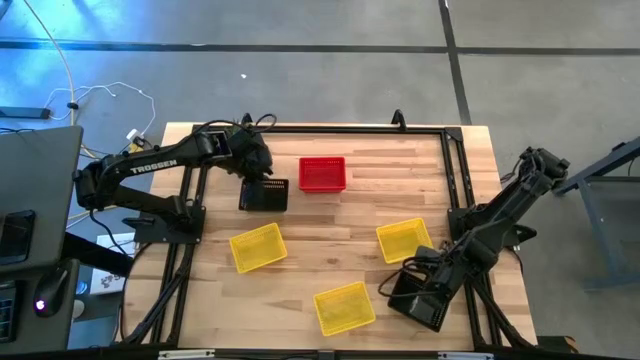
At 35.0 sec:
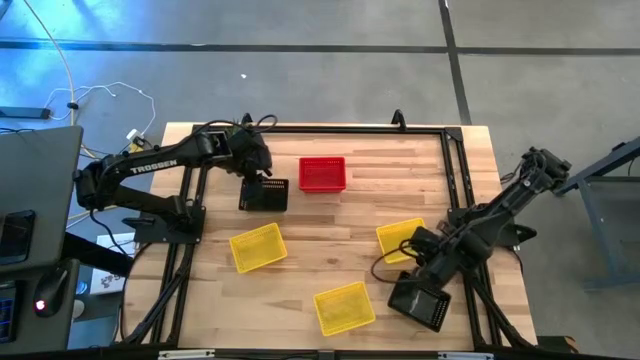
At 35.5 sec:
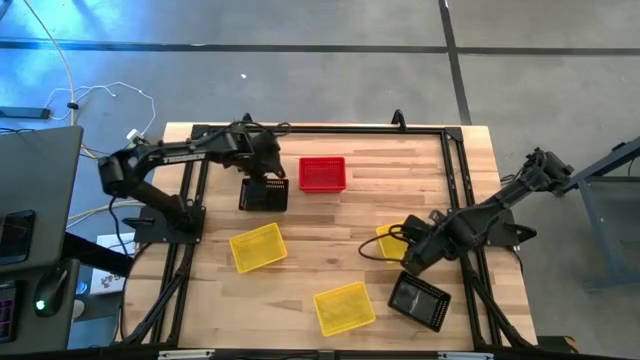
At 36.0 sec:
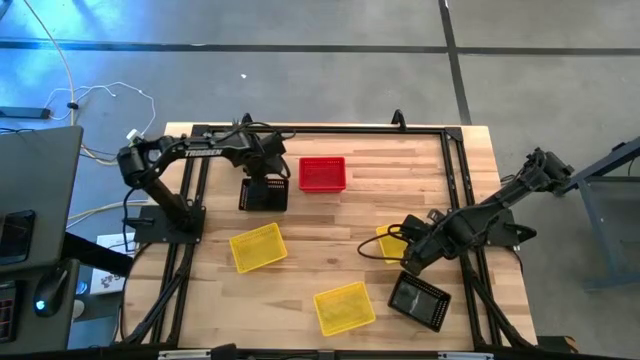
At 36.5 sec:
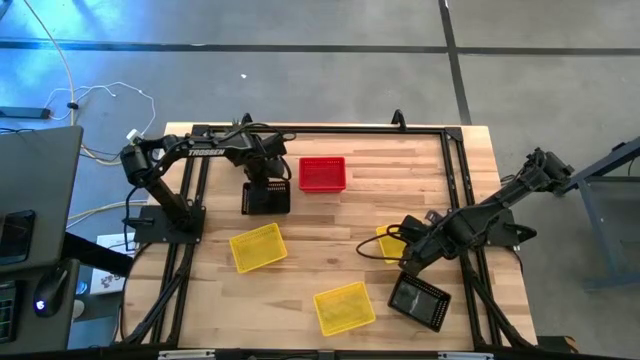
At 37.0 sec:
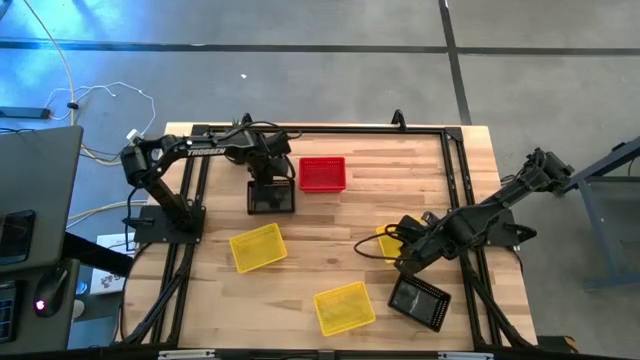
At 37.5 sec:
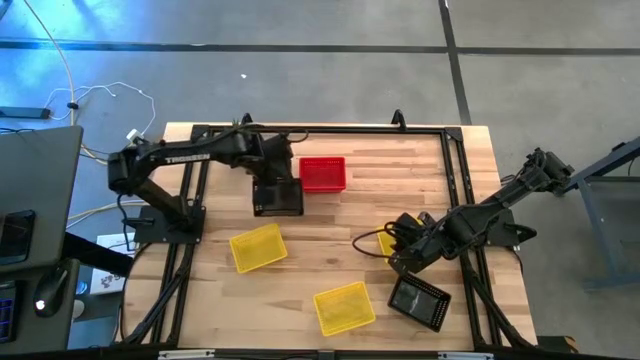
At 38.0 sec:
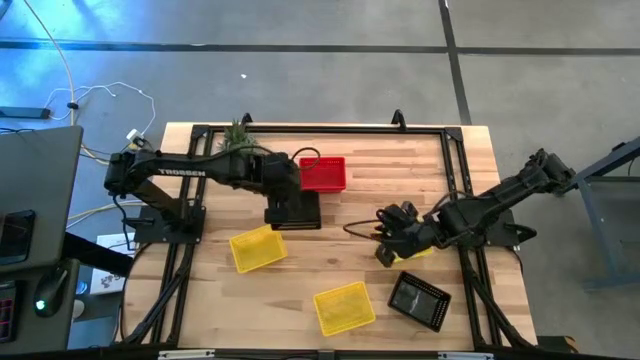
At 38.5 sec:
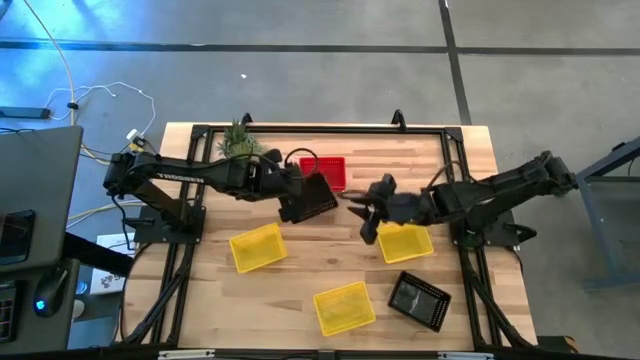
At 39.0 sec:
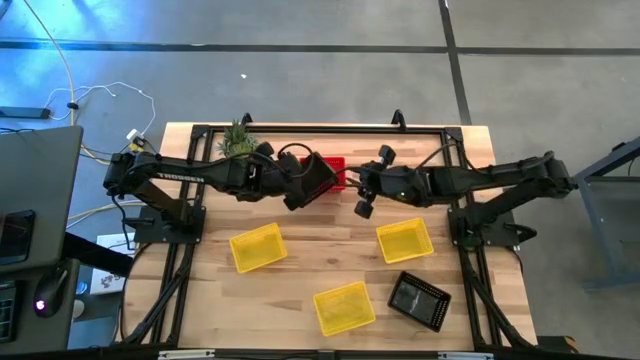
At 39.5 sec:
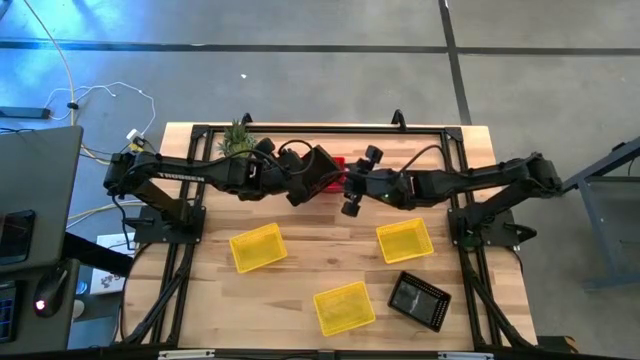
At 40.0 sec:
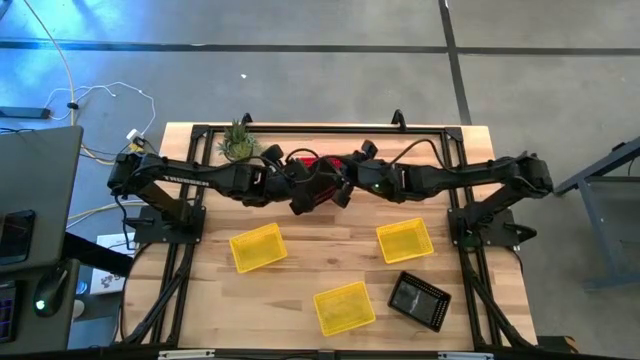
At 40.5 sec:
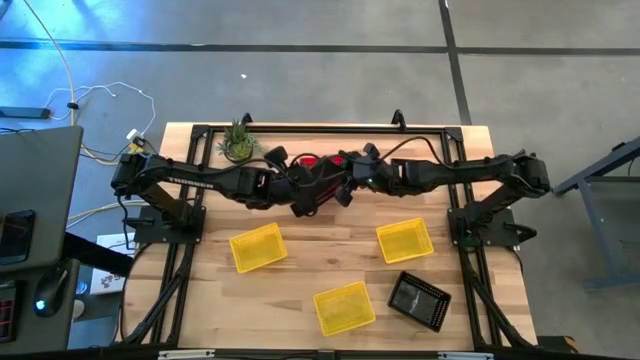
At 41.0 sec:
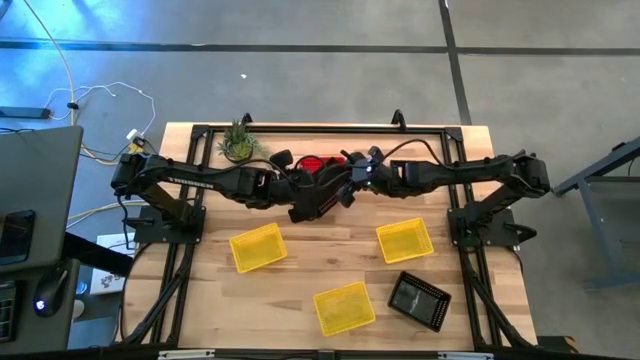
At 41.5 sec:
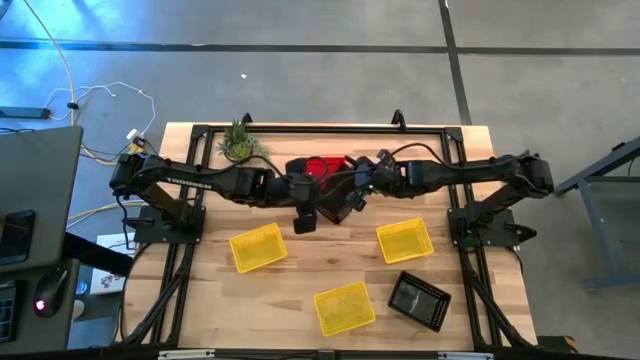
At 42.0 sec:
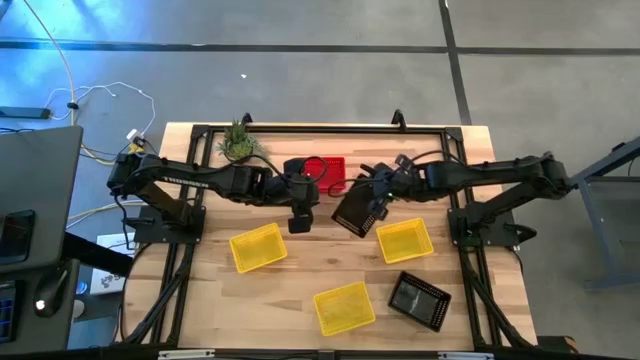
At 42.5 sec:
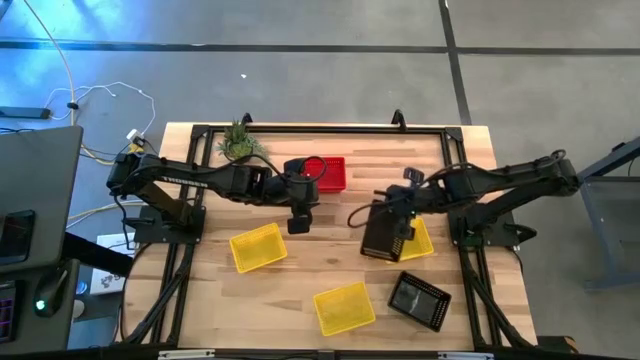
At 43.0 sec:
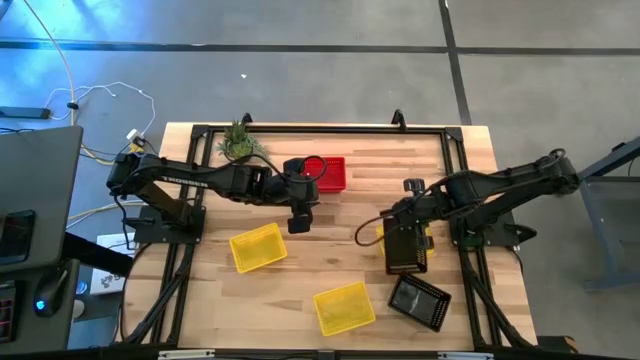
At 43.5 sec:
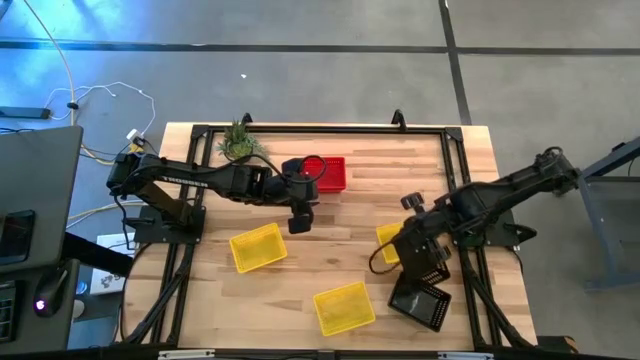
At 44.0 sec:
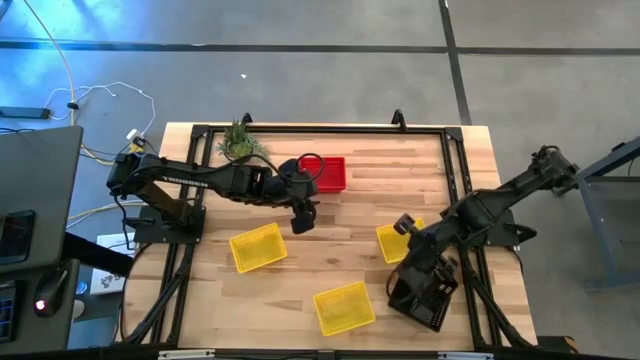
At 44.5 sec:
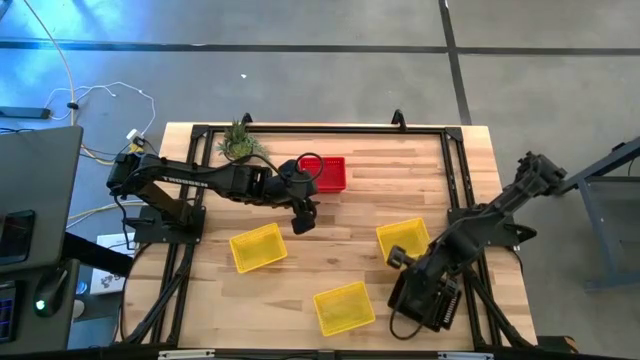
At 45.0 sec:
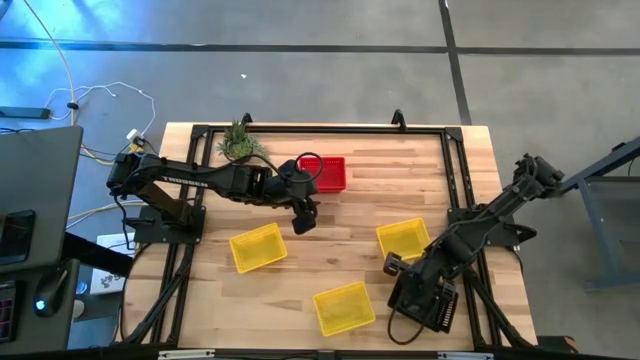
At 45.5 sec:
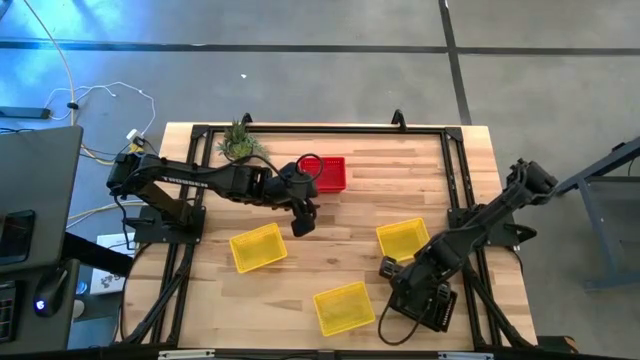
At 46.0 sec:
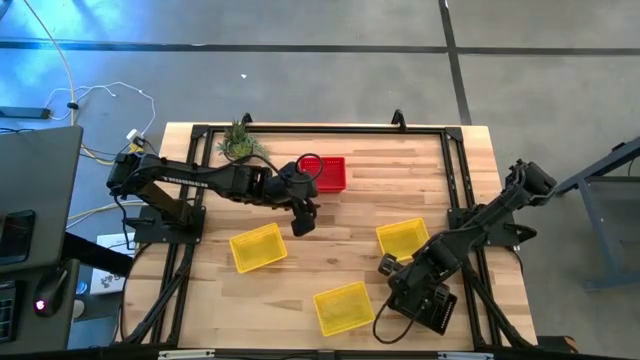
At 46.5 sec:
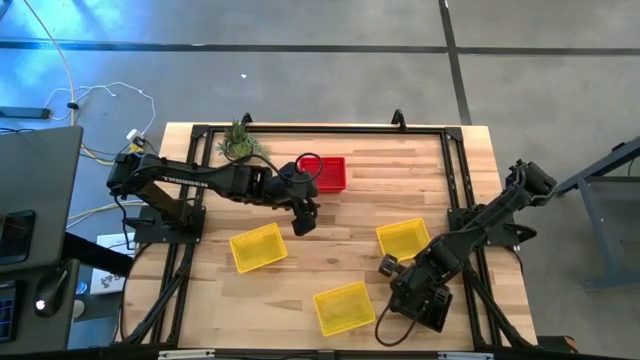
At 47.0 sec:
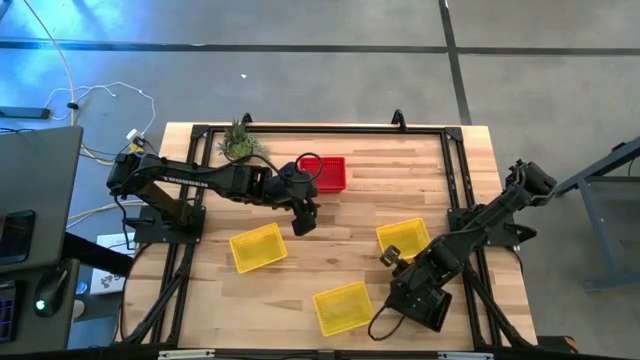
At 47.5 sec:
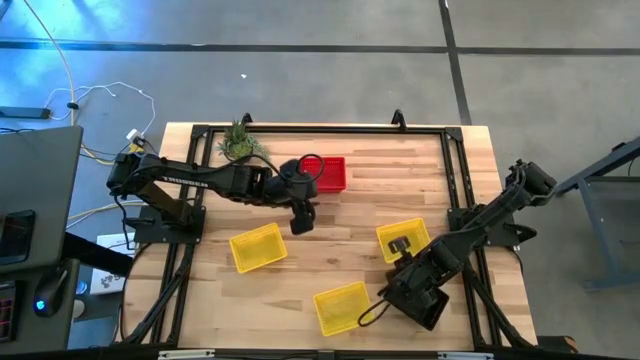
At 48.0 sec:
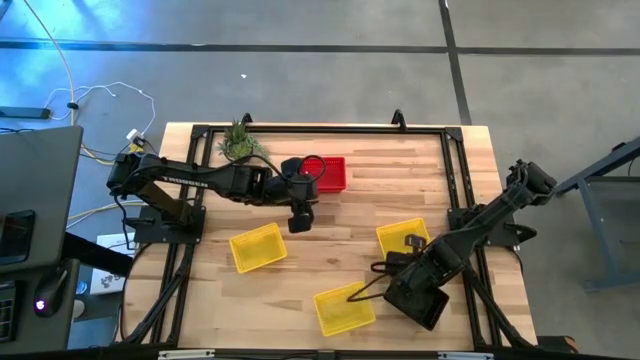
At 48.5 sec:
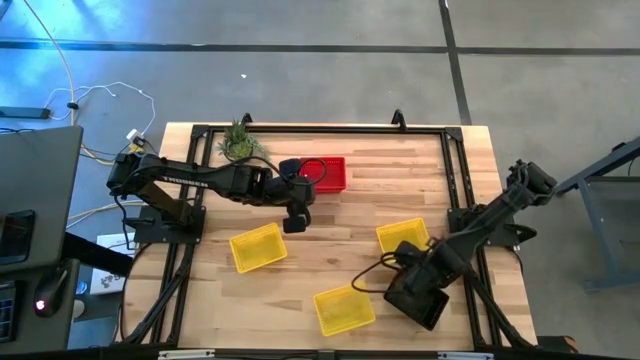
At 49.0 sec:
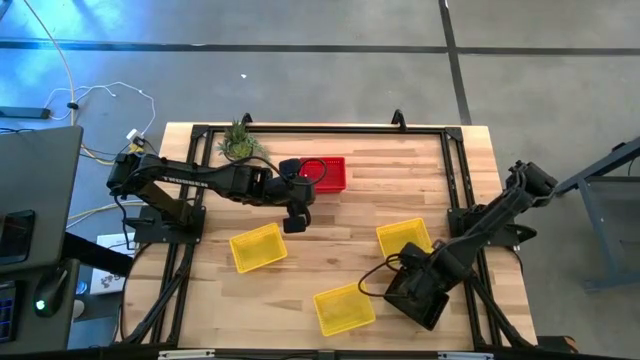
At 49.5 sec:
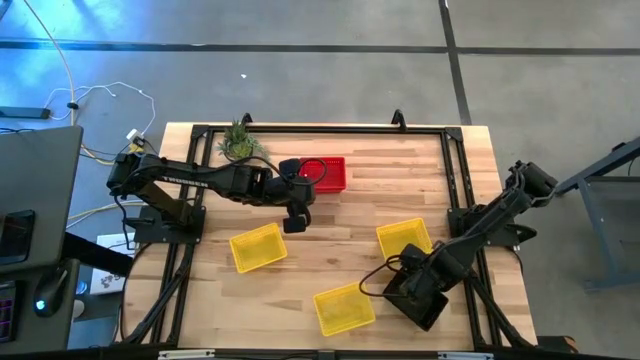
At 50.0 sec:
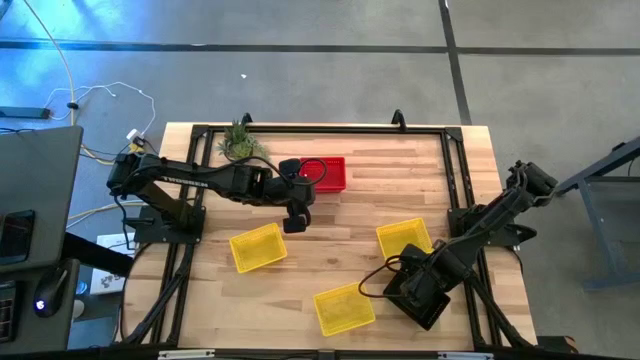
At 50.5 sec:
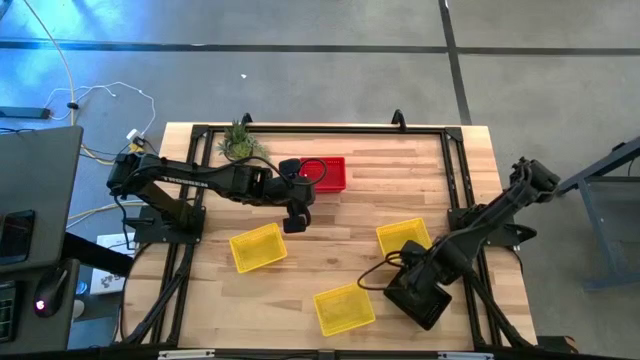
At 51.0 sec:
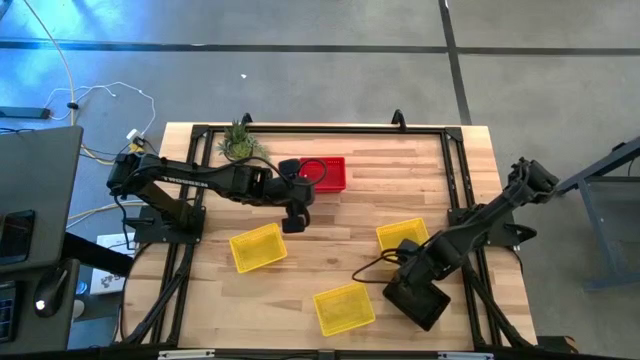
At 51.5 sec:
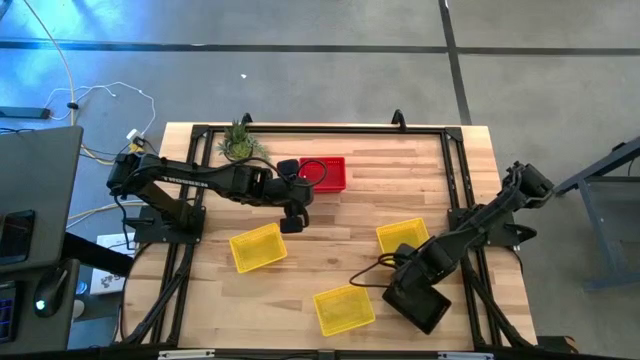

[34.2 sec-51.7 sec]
Stack the black basket on top of the other black baskets

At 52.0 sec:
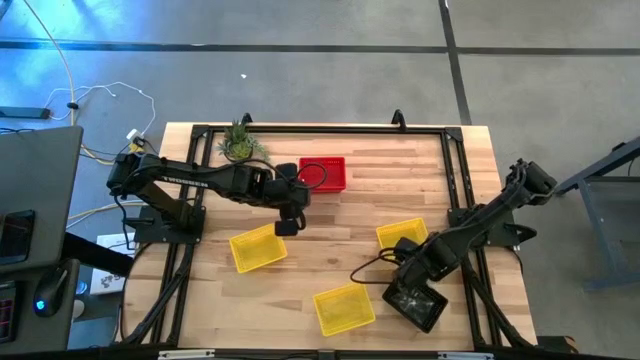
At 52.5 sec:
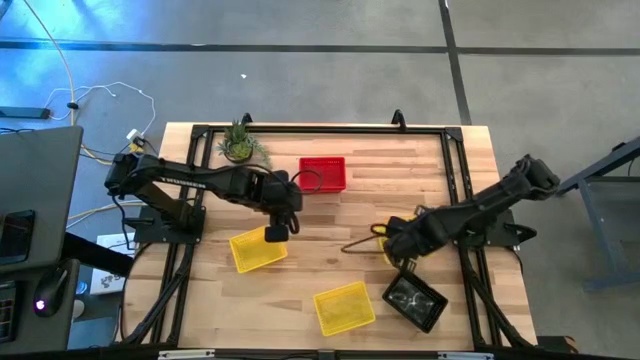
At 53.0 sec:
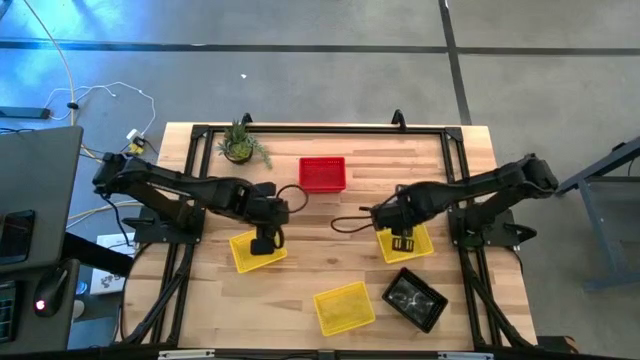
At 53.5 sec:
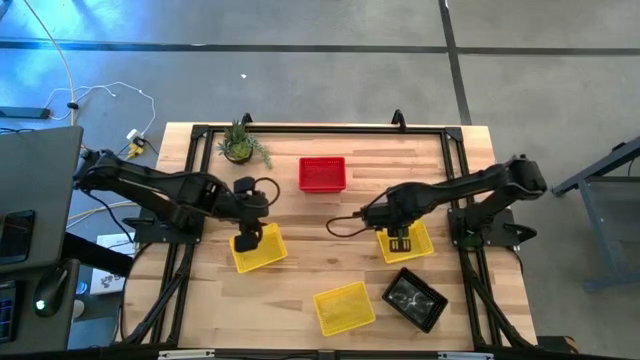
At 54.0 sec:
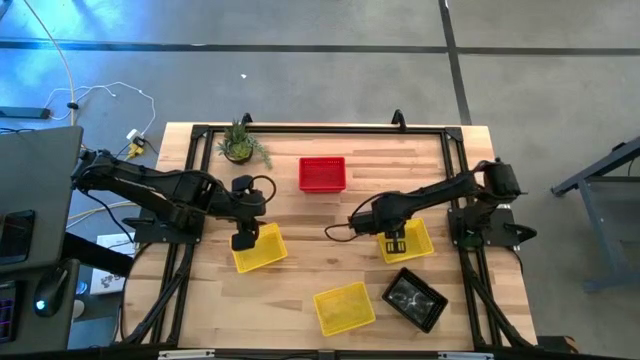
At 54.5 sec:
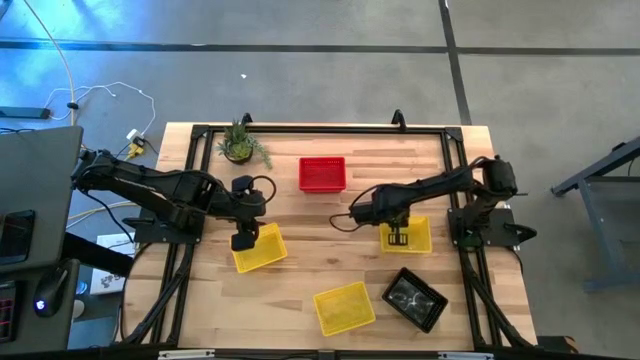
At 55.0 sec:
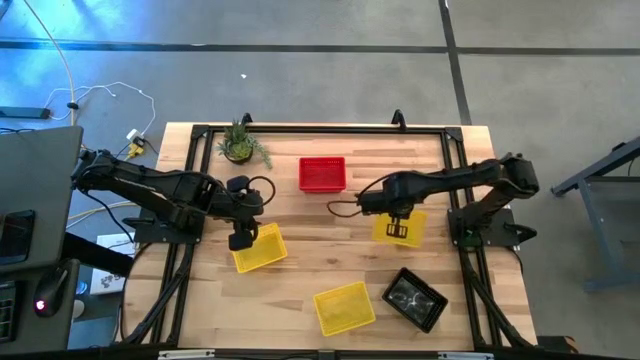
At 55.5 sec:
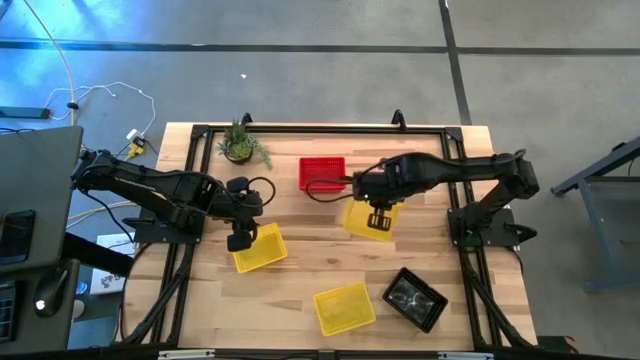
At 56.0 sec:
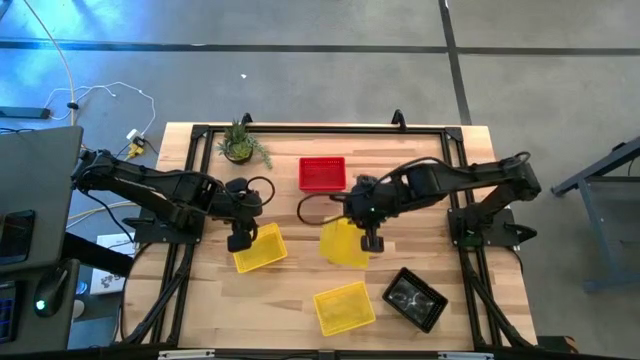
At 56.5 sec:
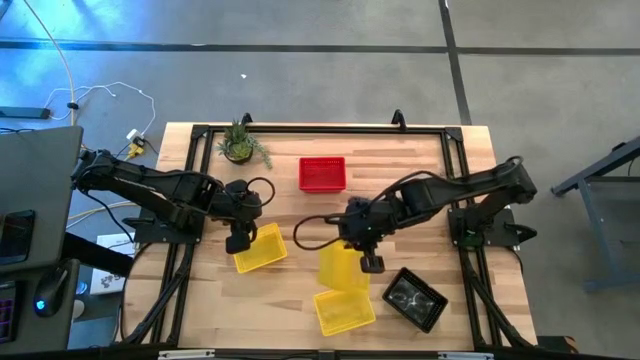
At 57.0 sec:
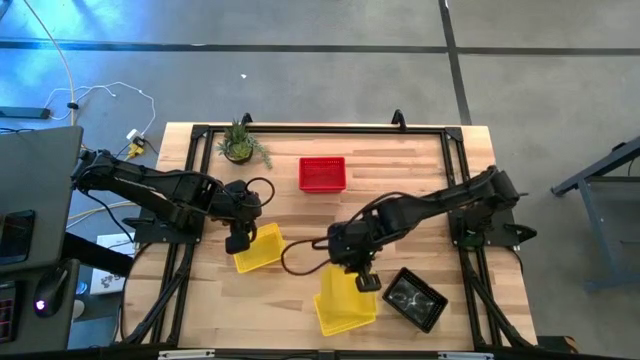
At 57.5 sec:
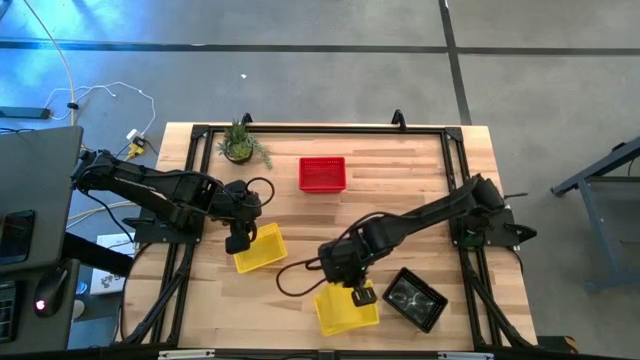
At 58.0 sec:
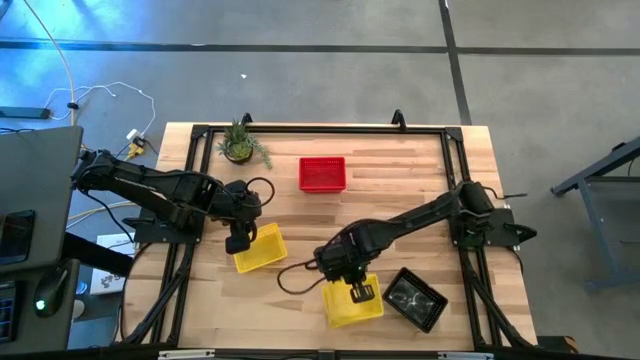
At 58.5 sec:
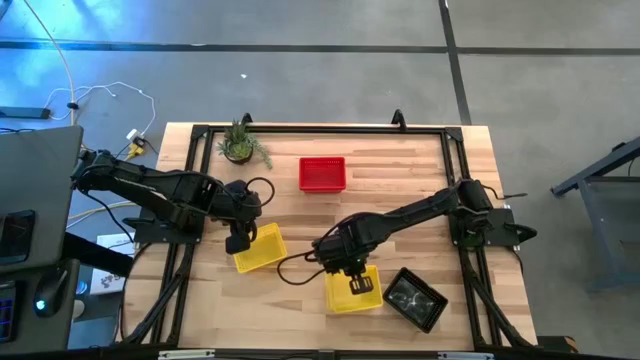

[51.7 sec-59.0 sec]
Stack the top right yellow basket on top of the bottom yellow basket
